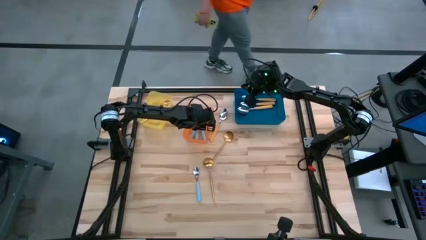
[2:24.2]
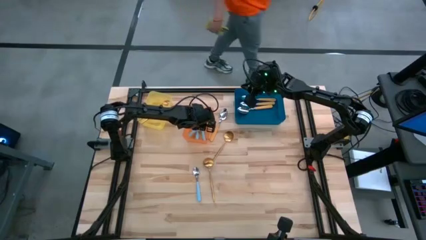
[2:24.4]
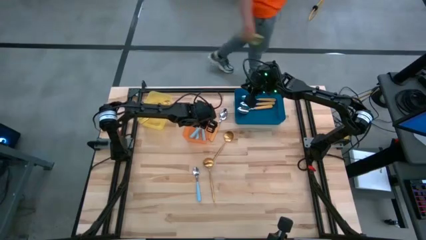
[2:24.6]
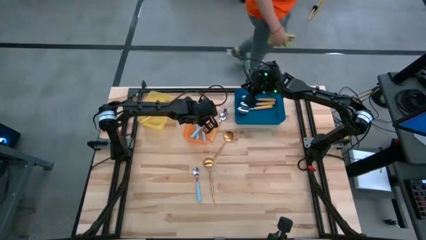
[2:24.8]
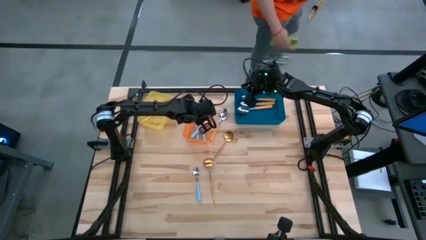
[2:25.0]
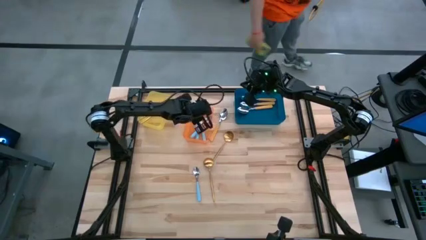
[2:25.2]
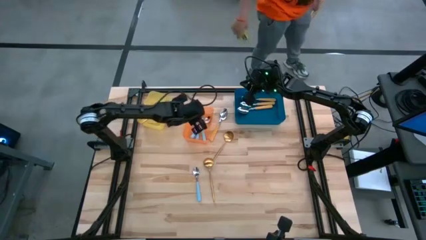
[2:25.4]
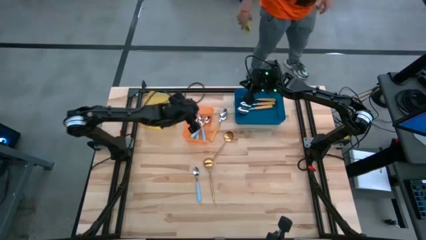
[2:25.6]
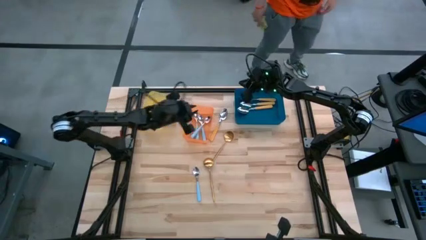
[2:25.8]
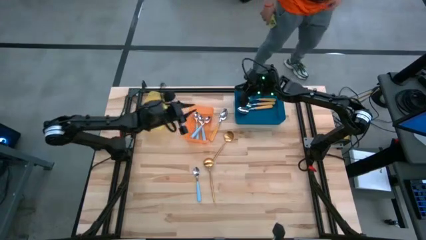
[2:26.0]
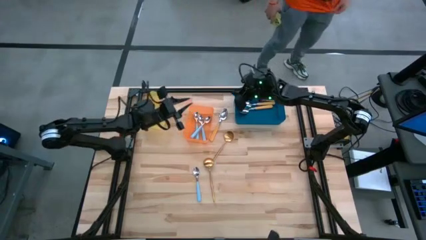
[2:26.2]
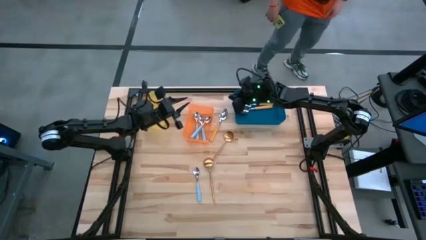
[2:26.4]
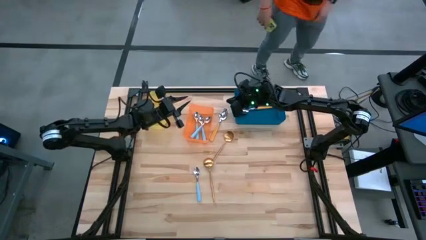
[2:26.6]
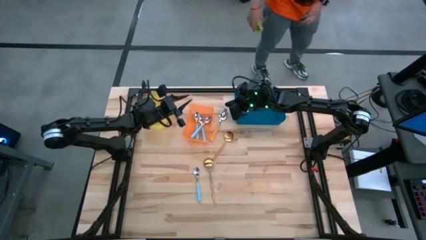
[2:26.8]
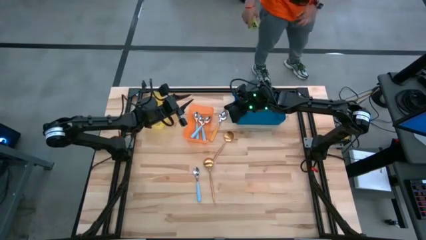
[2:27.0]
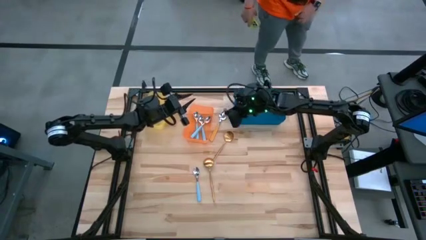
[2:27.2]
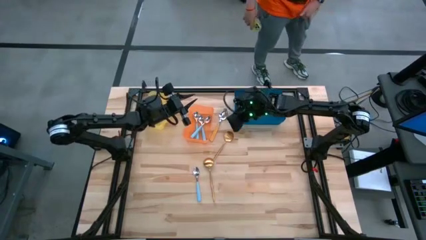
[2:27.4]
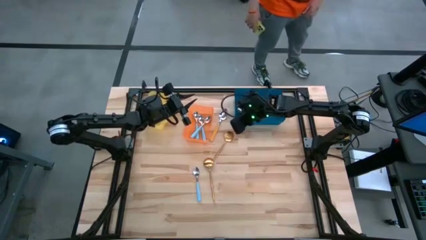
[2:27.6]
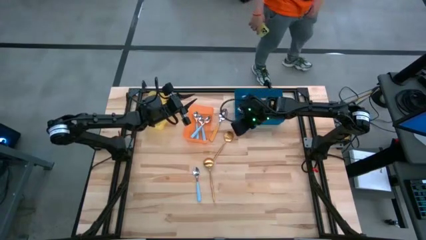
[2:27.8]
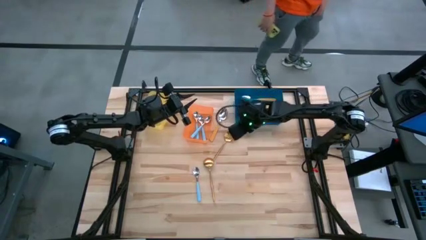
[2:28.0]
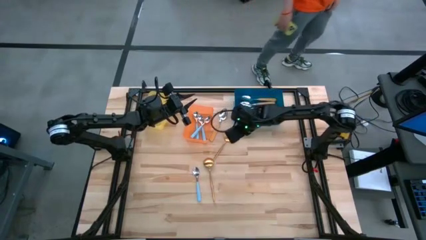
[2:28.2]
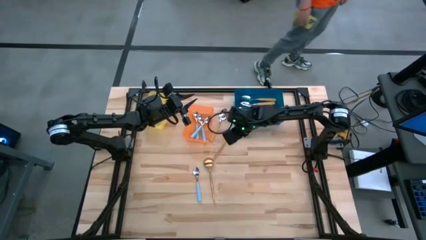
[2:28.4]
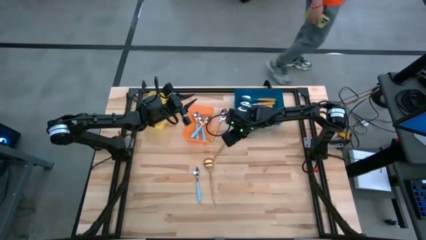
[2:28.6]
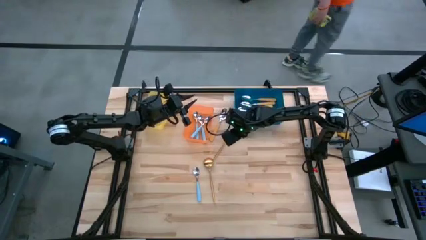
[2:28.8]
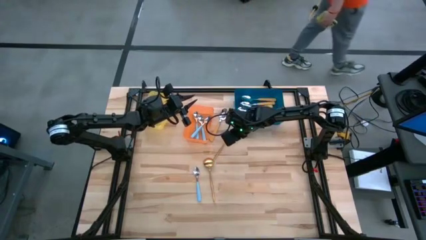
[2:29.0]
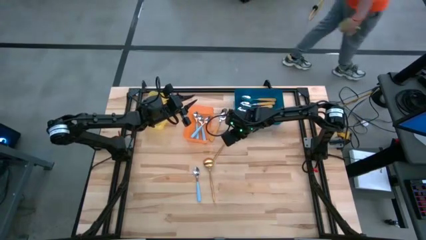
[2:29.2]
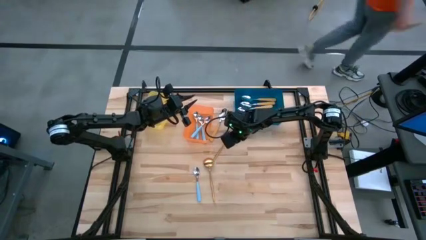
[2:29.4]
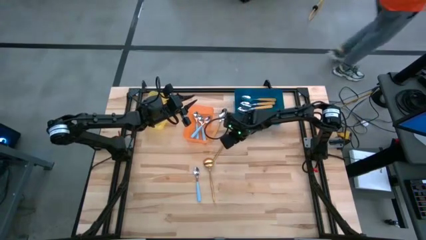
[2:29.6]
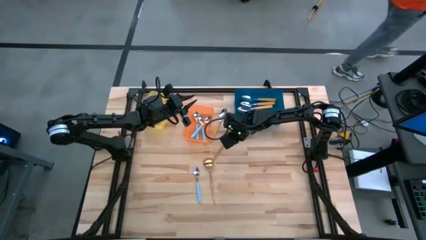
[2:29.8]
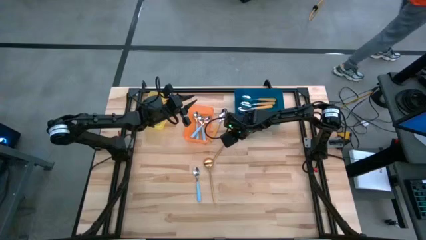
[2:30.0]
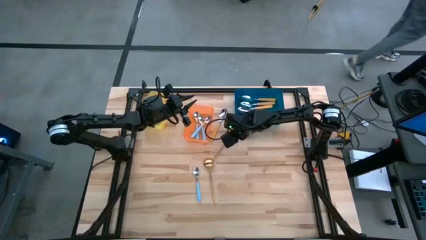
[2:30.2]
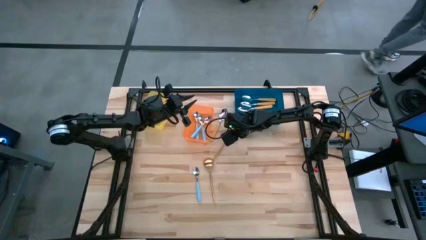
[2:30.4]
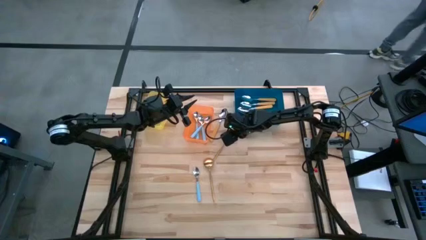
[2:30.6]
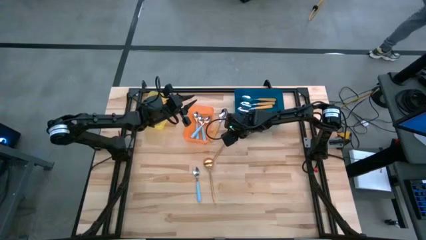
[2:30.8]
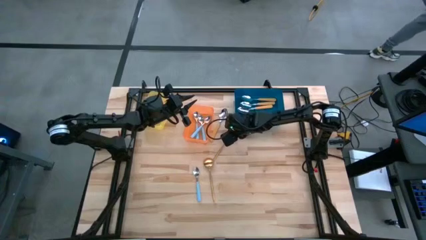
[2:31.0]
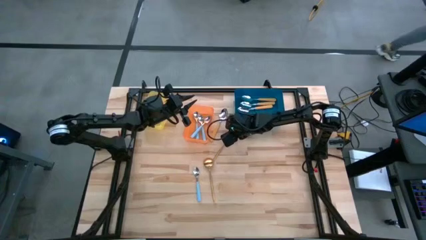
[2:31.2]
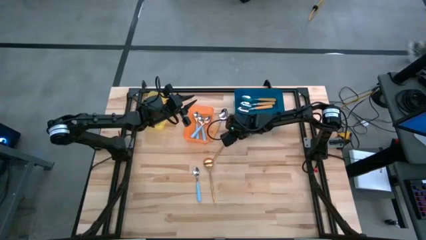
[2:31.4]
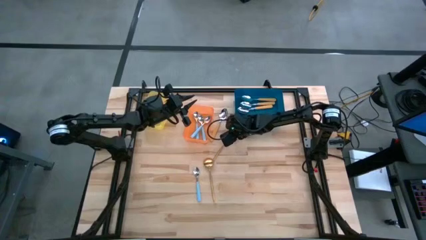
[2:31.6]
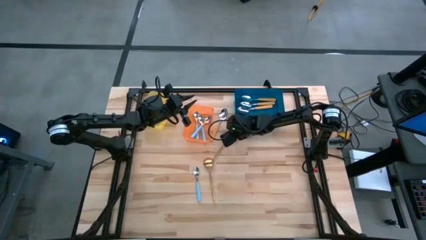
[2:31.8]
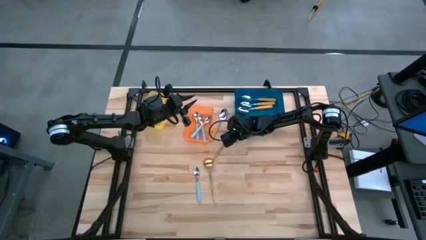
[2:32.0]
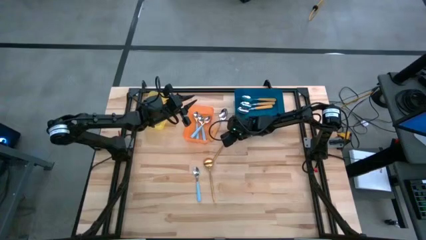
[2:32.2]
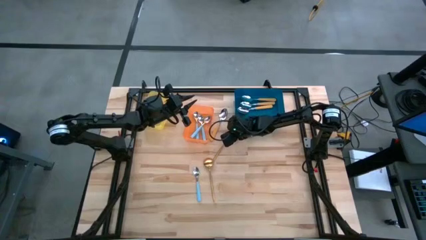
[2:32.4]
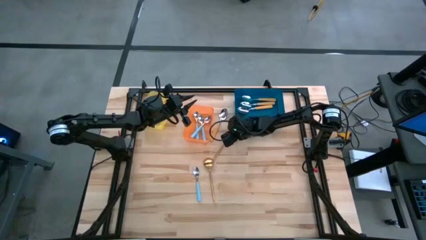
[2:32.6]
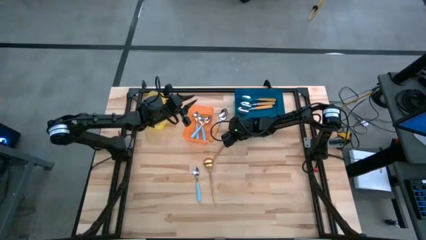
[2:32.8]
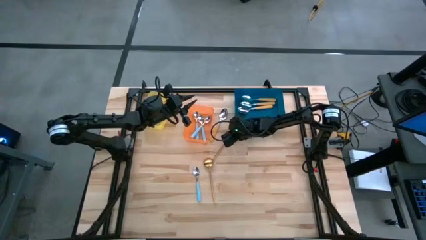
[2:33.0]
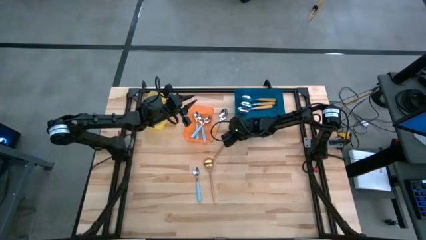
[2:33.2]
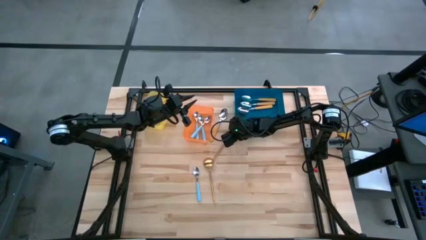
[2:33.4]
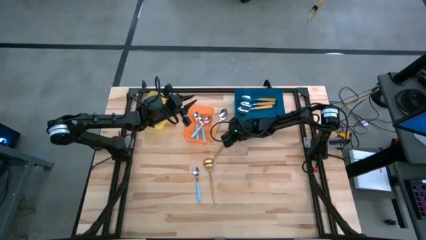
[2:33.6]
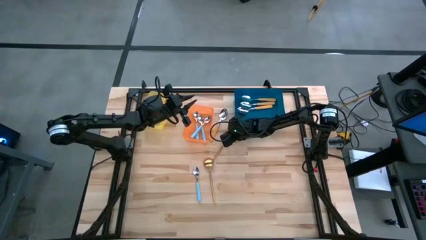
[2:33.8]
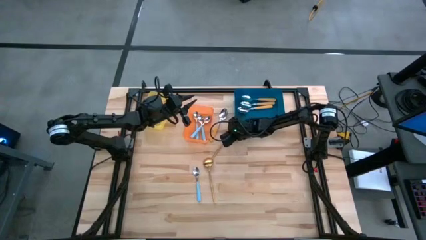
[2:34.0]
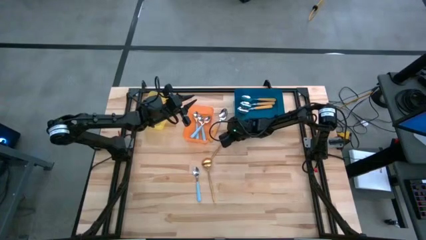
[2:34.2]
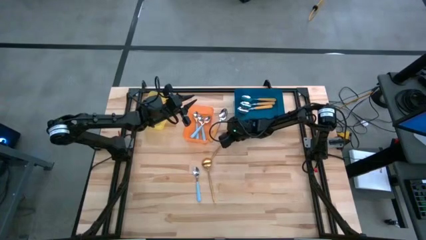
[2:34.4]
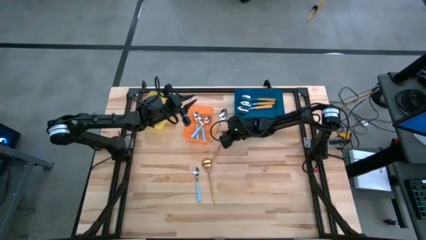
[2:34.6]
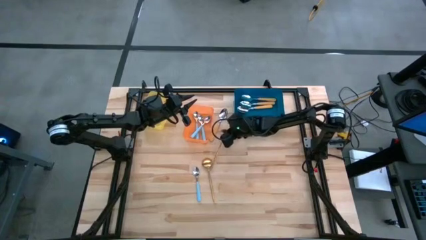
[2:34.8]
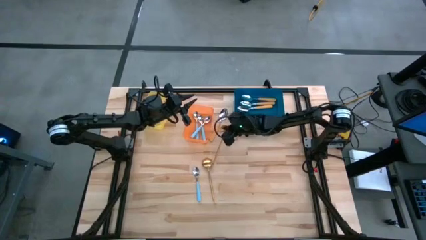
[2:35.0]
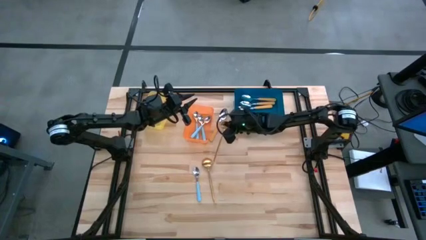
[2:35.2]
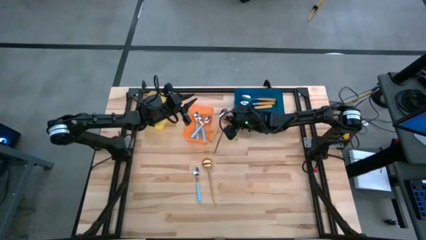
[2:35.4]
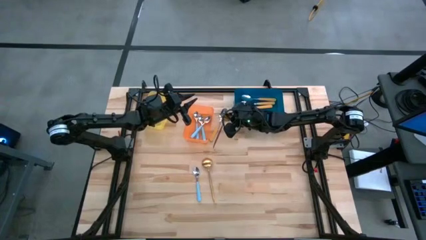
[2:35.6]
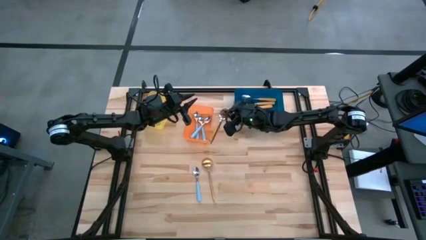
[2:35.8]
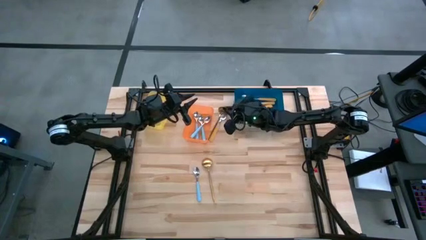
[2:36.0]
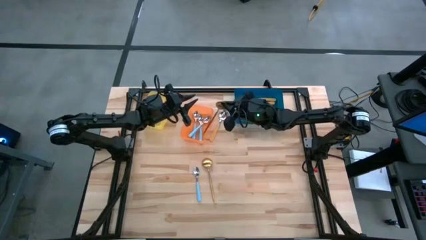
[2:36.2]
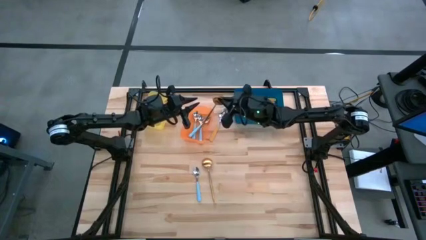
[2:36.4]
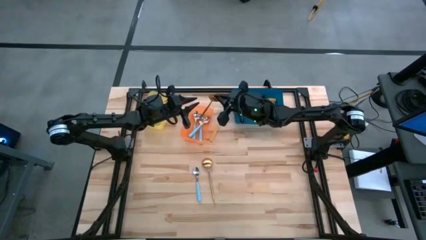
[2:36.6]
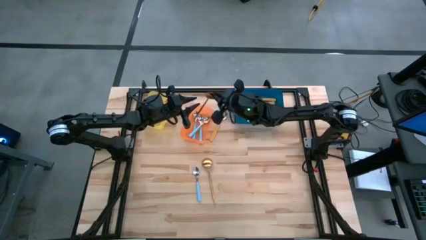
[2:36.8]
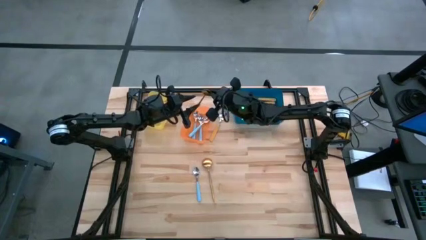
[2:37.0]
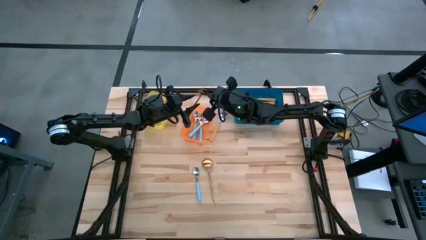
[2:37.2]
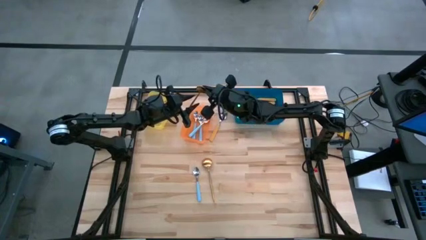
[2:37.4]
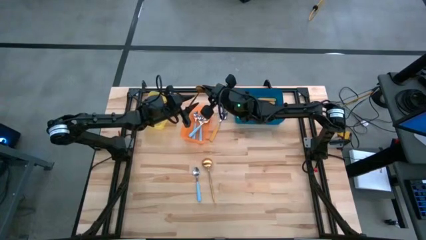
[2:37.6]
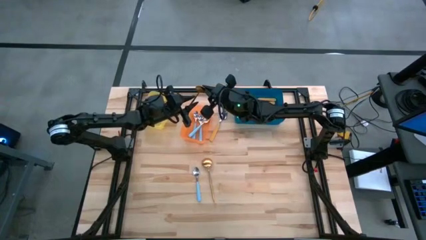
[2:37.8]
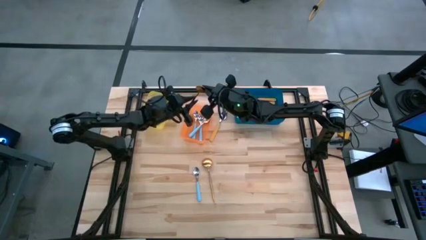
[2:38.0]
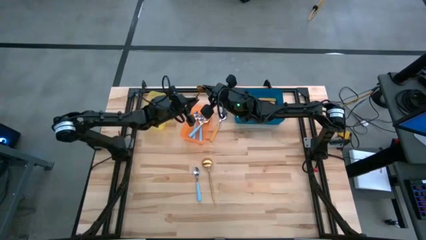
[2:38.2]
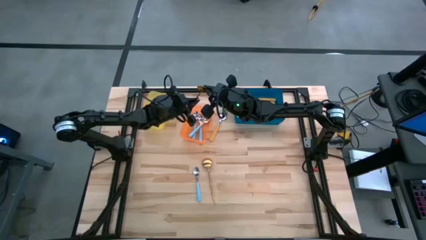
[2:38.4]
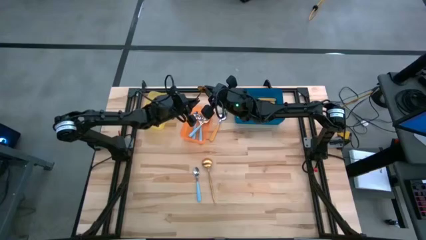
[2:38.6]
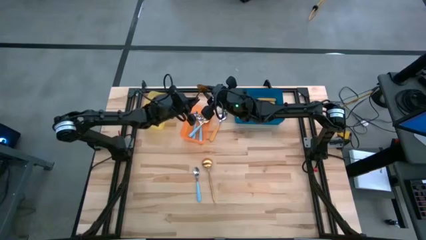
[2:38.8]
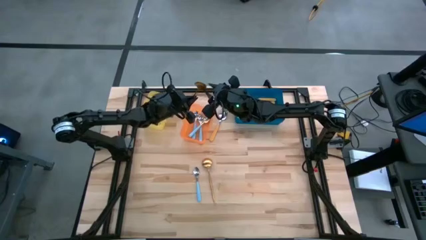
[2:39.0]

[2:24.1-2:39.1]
Task: Sort silverware by color (type)
Put the gold spoon into the yellow bin
